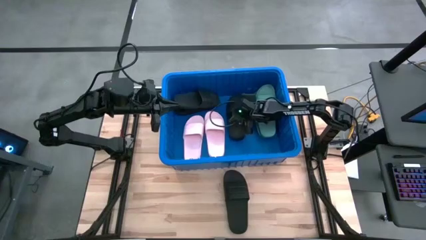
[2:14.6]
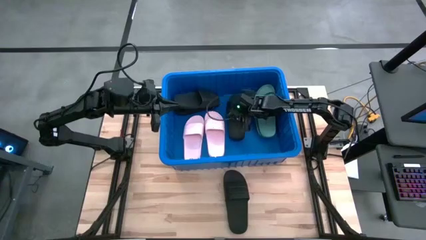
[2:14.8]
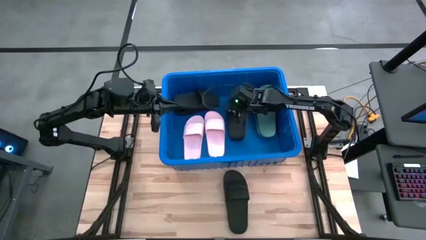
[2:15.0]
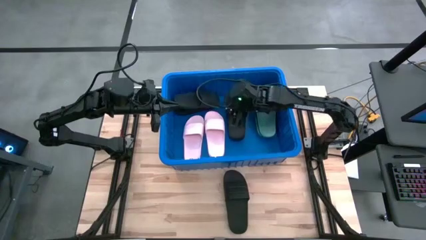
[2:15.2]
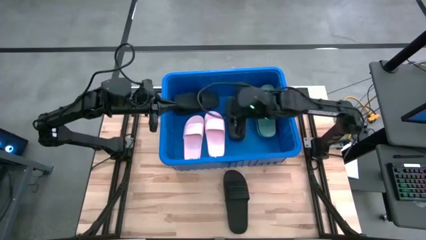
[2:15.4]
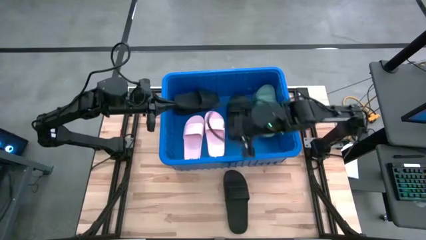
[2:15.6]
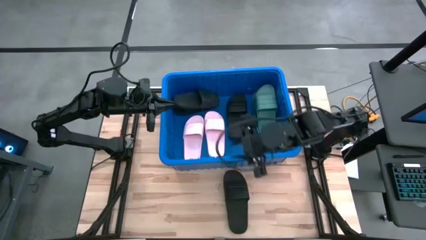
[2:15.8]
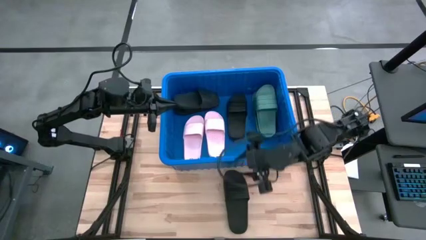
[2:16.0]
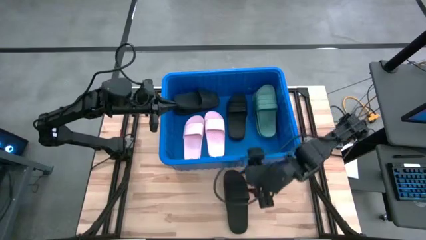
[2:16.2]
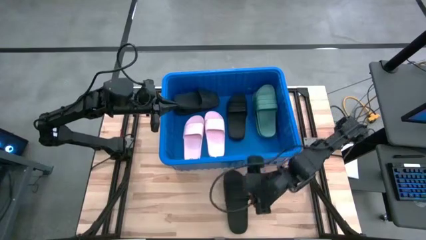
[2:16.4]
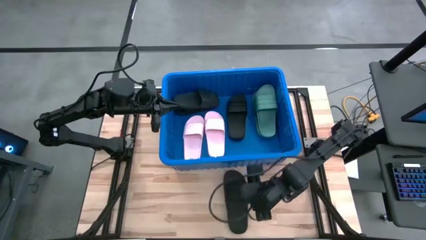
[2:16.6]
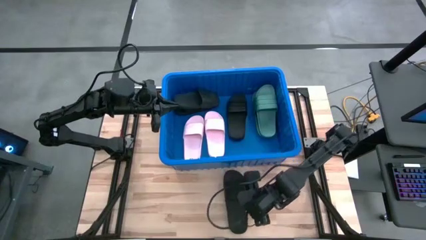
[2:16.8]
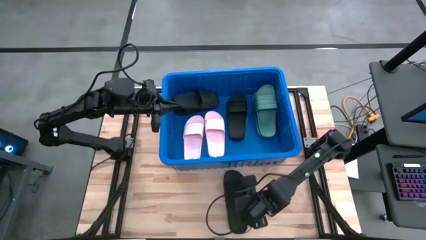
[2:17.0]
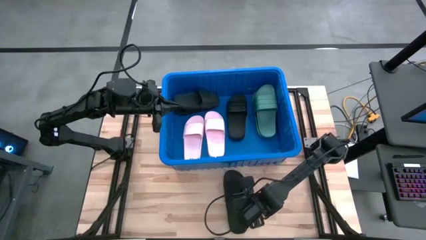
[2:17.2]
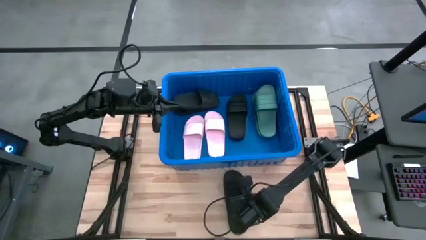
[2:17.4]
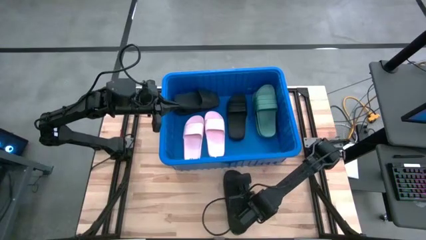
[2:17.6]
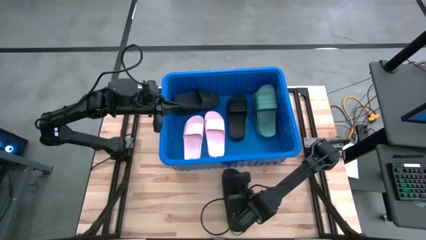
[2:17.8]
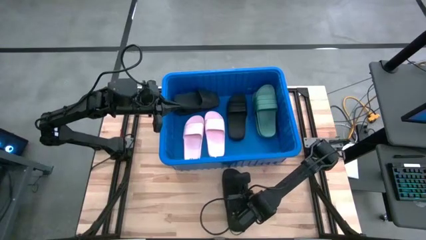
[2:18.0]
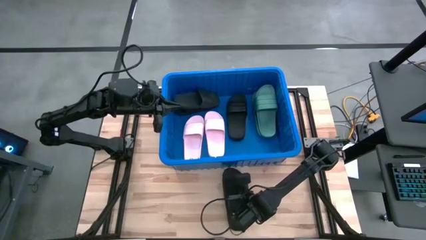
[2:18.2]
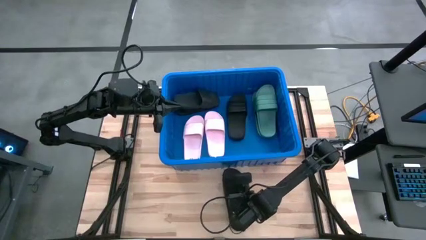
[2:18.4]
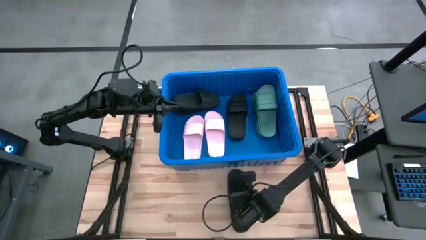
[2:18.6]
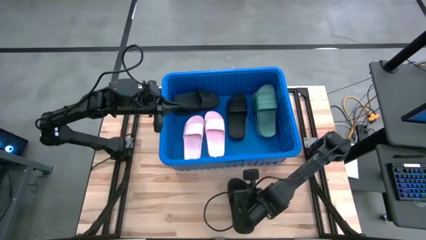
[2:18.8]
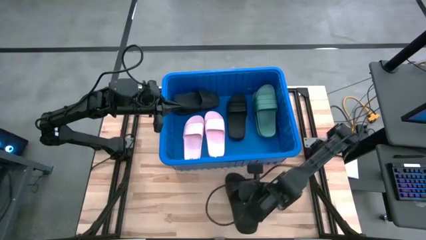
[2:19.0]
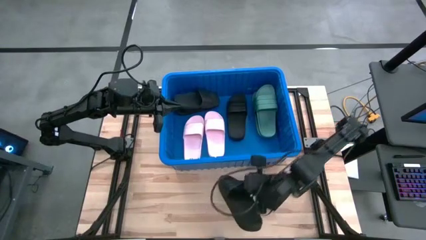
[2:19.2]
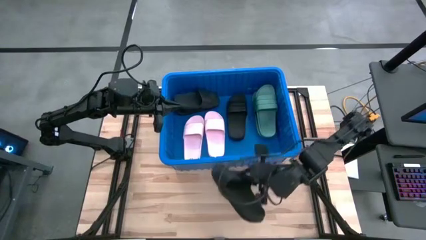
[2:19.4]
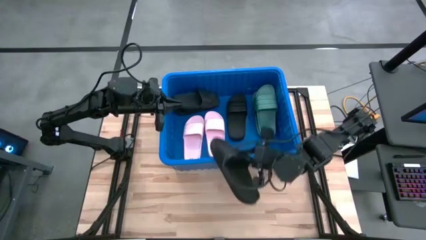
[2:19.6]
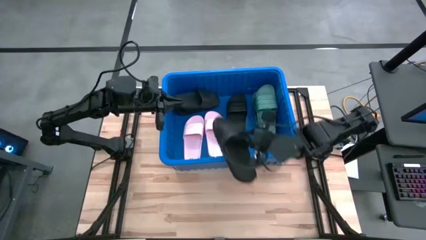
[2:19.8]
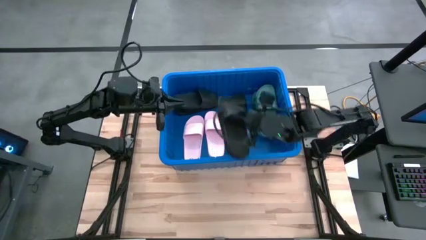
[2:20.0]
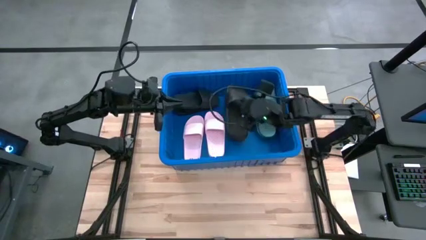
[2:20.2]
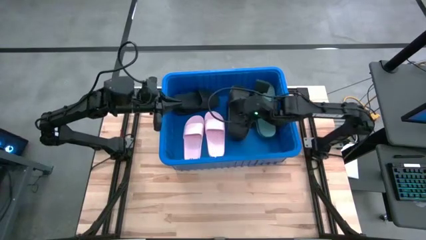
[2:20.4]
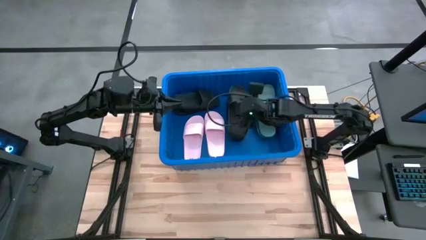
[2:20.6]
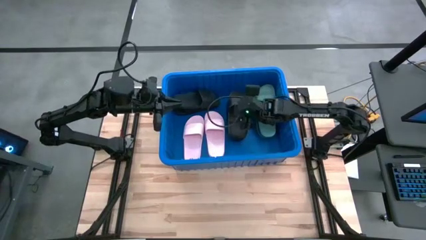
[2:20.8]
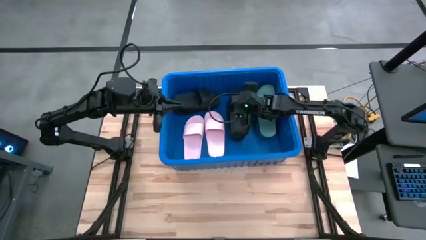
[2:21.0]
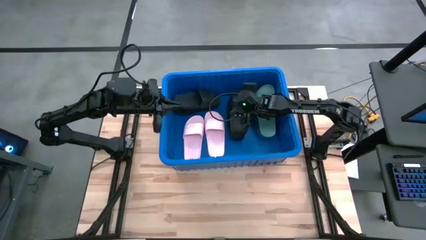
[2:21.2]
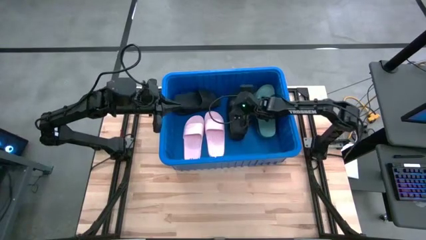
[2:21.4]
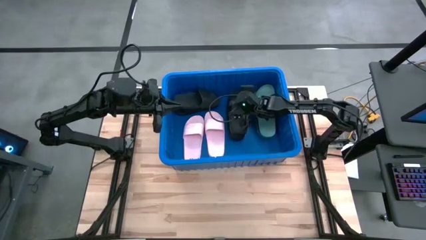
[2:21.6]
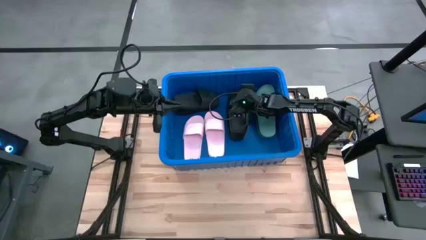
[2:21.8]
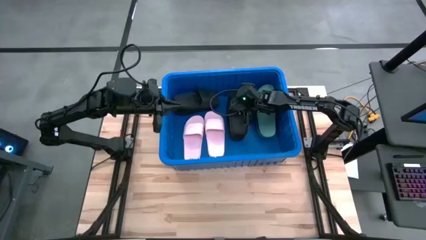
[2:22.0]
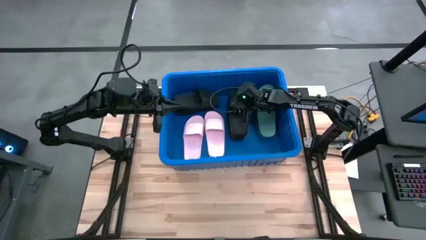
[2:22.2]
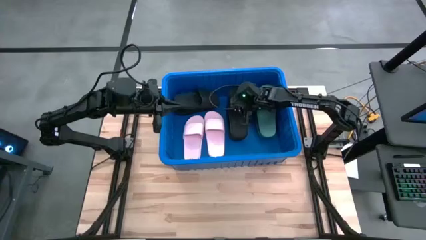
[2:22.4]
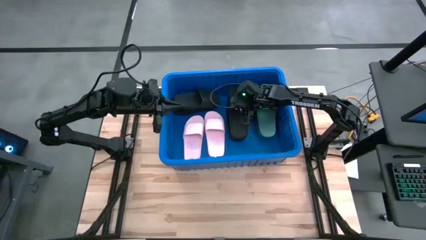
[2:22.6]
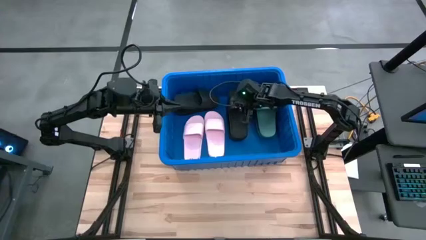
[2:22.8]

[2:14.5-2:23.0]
Task: Pick and place slides into bin
Put the black slide into the blue container

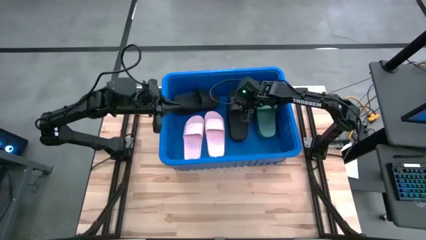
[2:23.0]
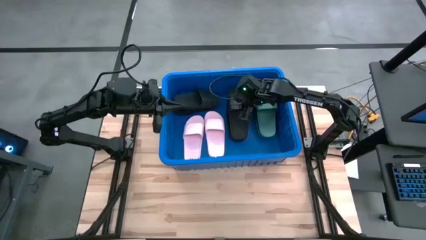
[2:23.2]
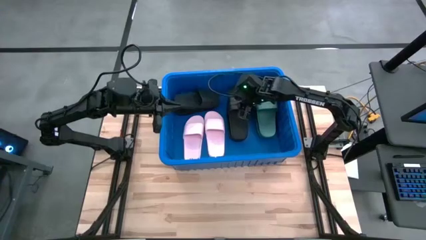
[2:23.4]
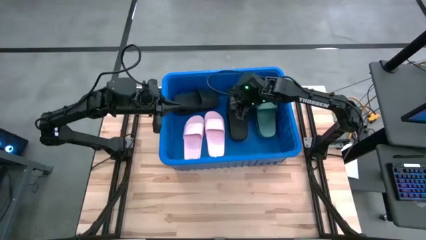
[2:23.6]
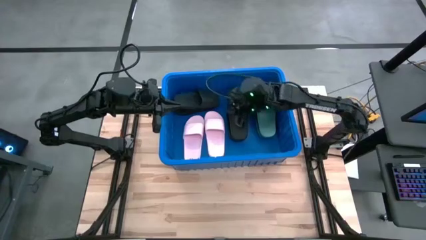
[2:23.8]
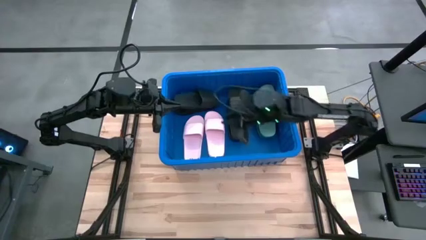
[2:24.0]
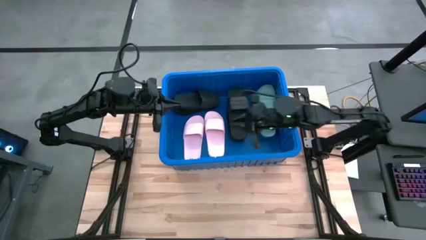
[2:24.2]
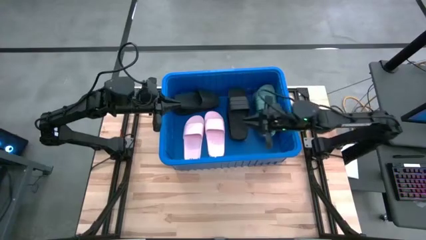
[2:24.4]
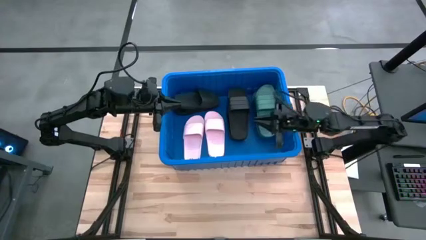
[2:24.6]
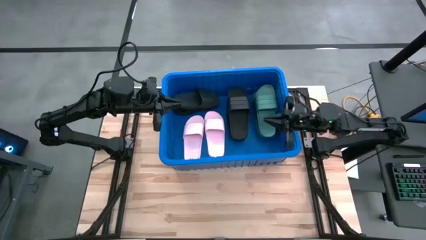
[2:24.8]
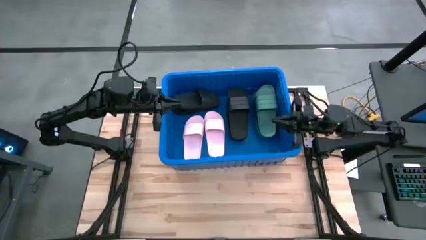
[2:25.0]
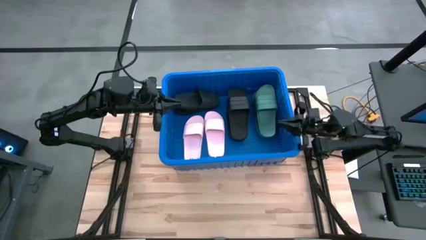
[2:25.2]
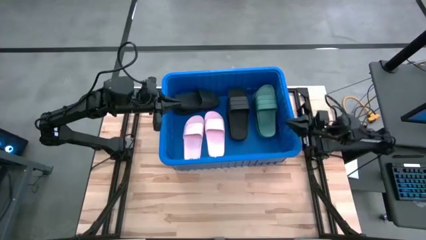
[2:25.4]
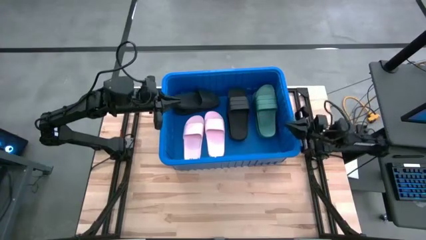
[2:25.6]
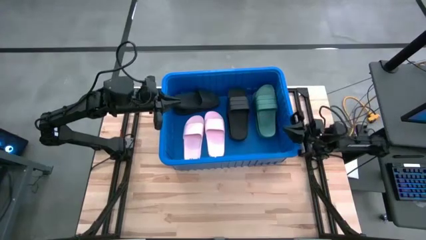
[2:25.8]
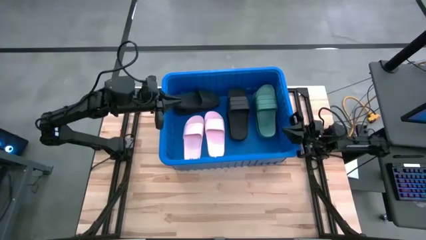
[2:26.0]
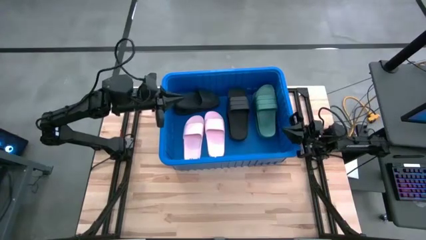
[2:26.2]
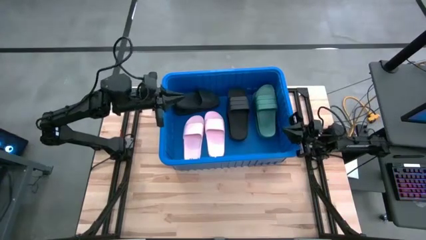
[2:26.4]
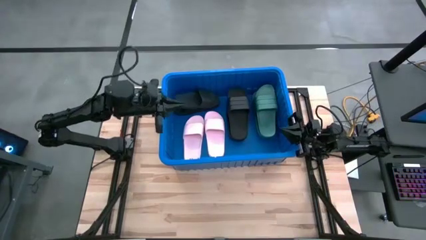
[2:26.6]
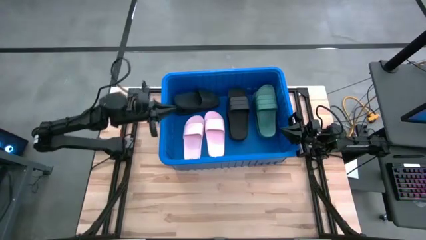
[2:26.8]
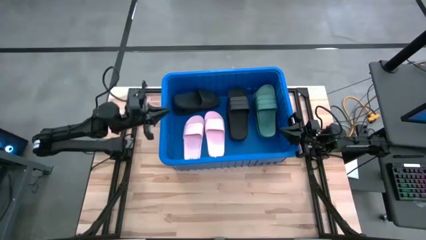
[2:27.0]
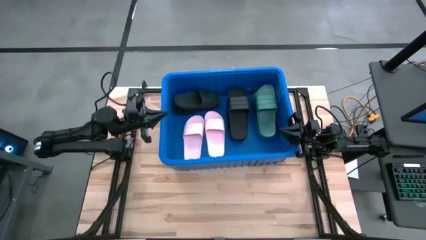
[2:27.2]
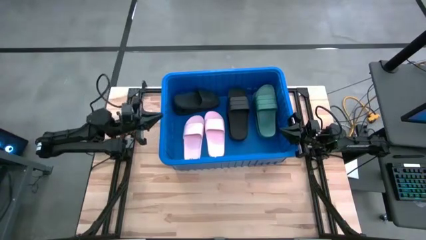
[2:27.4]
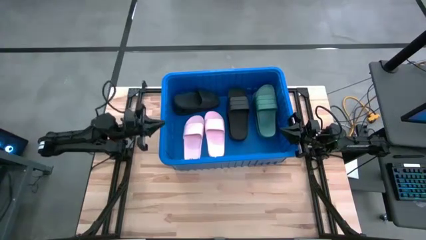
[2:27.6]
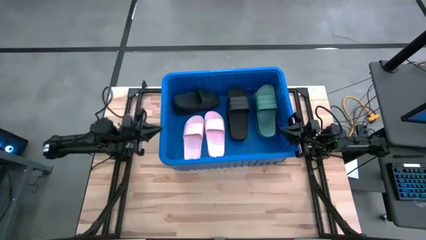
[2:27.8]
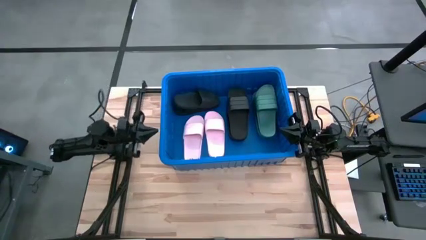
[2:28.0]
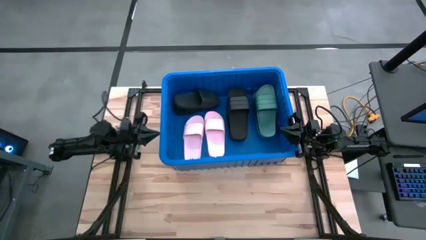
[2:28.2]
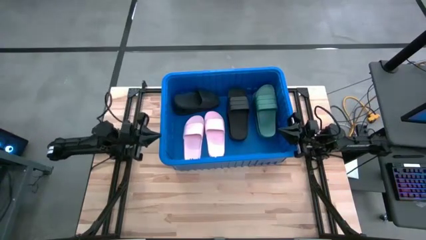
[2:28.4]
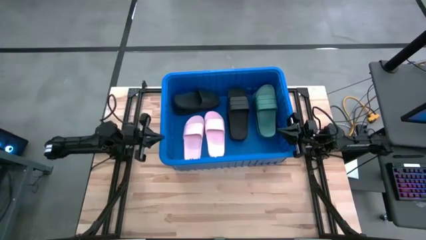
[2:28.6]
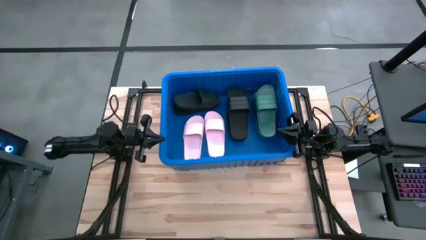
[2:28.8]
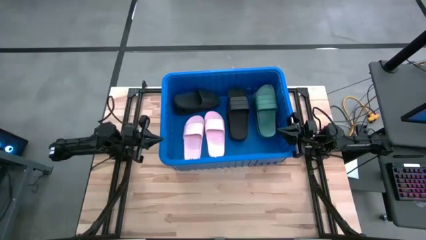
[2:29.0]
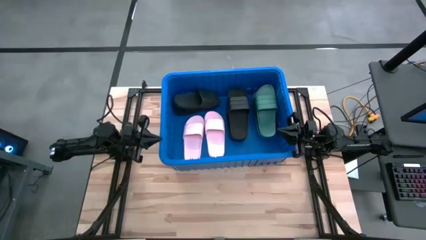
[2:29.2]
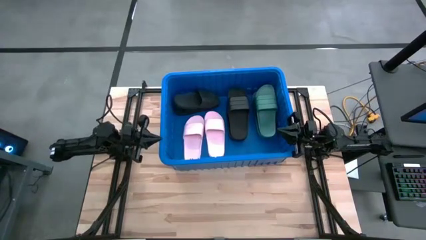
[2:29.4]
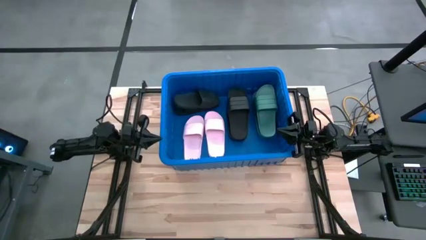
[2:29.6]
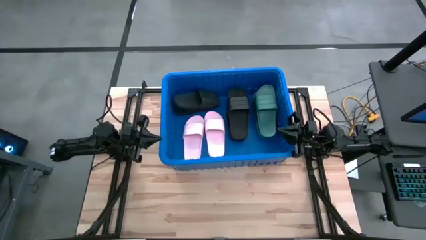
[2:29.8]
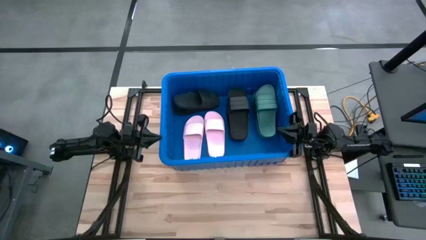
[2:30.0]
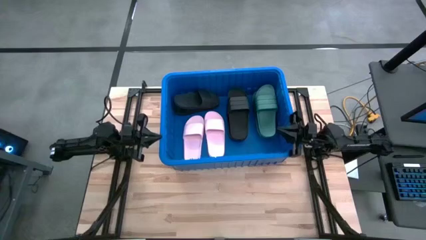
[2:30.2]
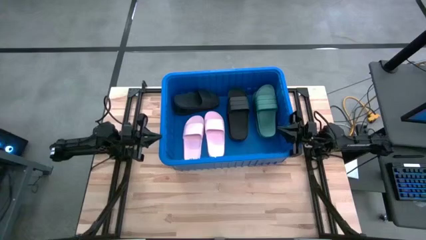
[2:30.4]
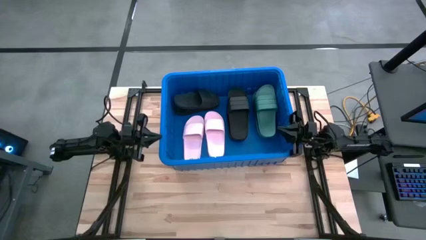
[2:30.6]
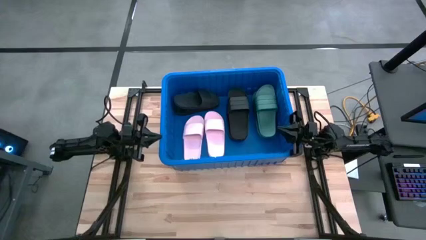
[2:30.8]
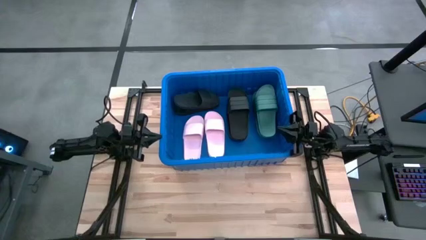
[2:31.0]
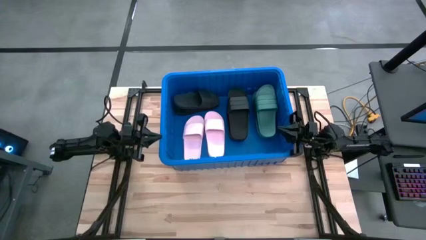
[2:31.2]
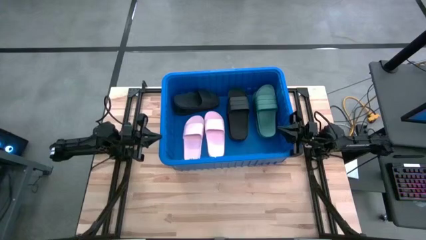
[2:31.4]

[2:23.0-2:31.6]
Return to Home Position
